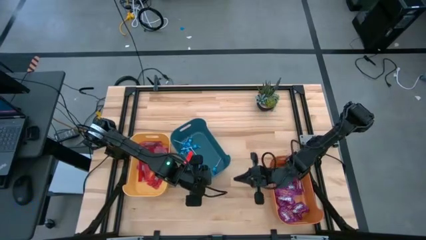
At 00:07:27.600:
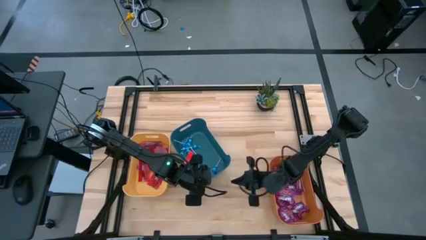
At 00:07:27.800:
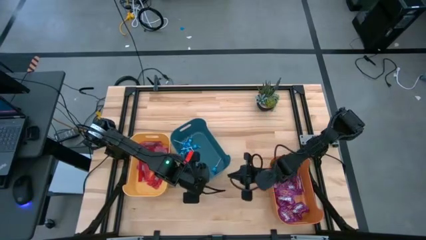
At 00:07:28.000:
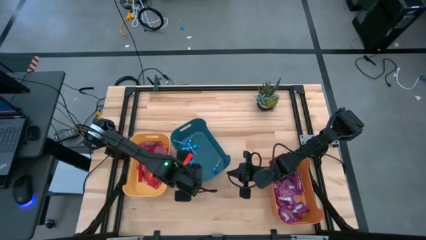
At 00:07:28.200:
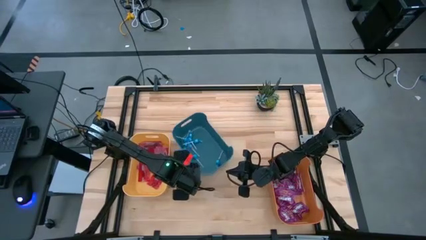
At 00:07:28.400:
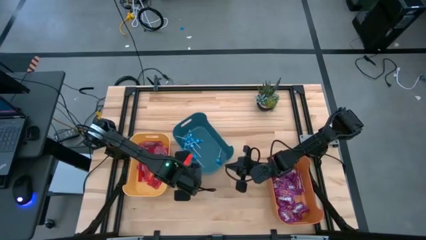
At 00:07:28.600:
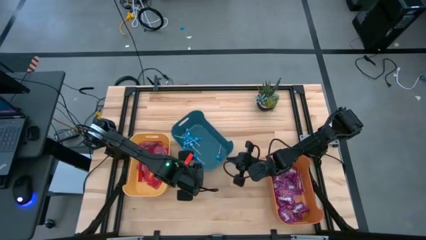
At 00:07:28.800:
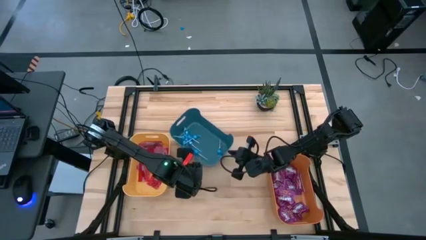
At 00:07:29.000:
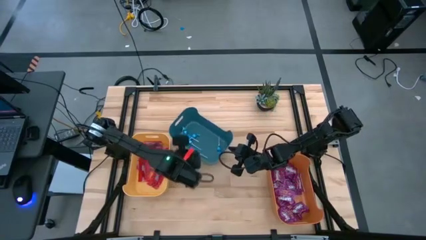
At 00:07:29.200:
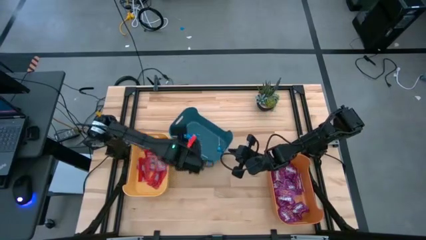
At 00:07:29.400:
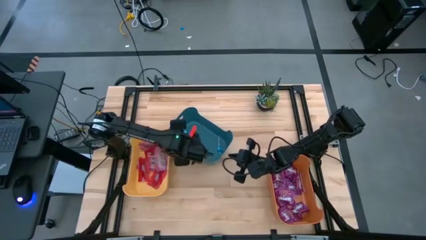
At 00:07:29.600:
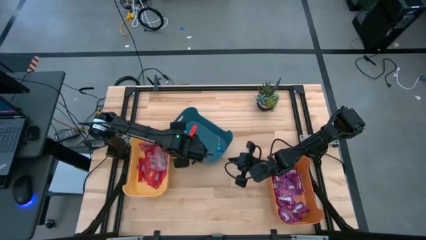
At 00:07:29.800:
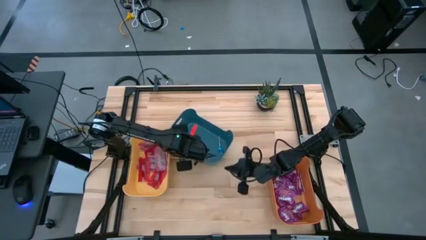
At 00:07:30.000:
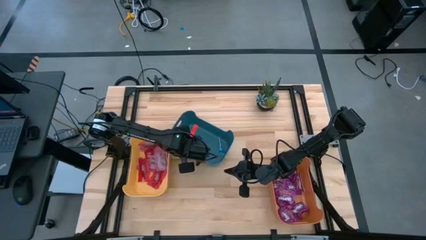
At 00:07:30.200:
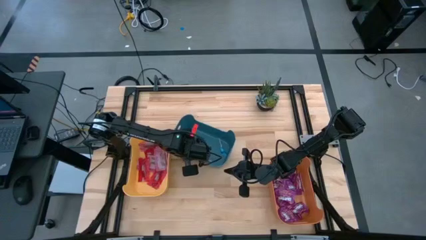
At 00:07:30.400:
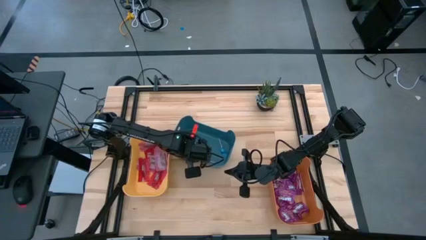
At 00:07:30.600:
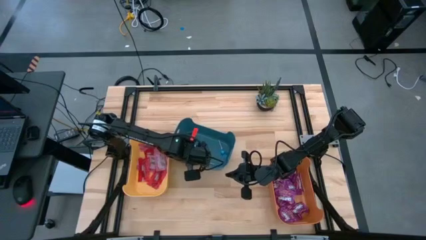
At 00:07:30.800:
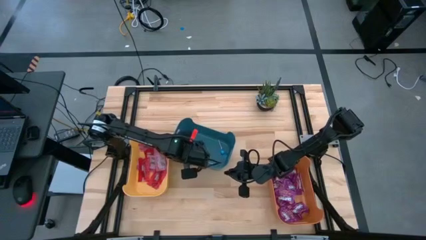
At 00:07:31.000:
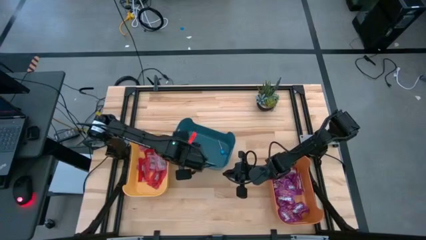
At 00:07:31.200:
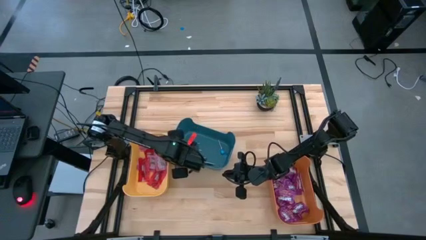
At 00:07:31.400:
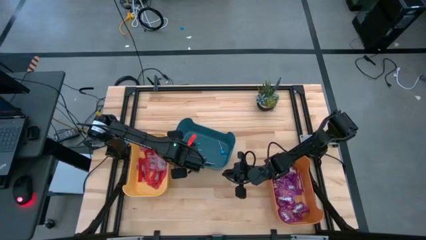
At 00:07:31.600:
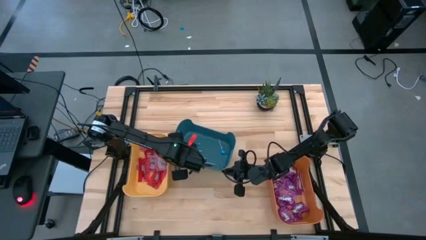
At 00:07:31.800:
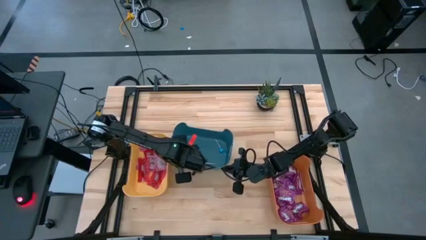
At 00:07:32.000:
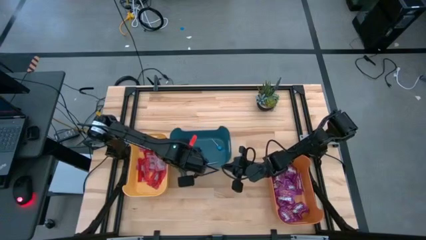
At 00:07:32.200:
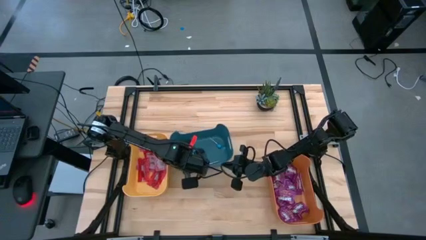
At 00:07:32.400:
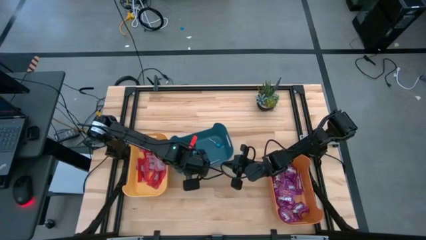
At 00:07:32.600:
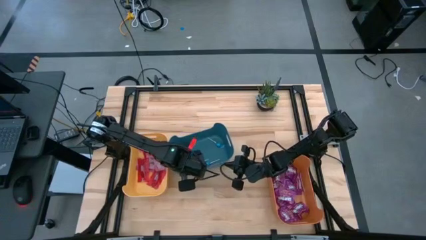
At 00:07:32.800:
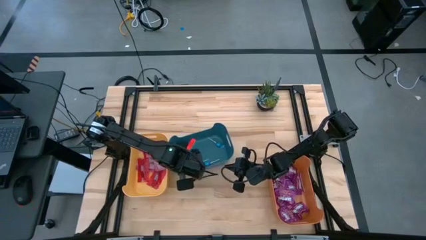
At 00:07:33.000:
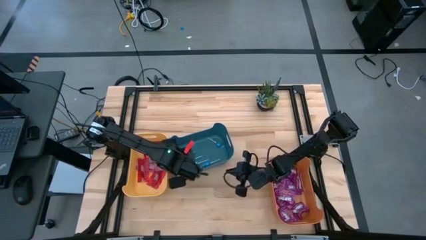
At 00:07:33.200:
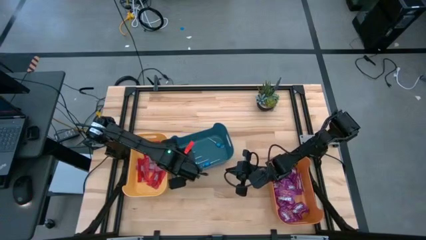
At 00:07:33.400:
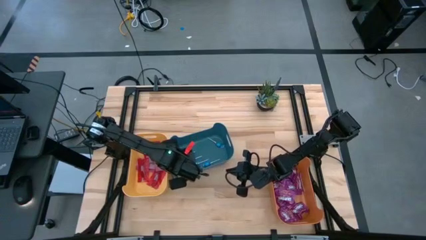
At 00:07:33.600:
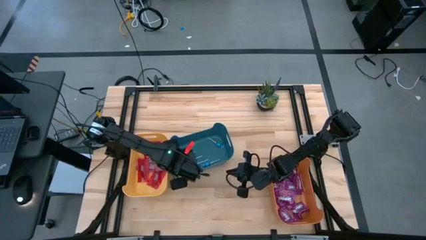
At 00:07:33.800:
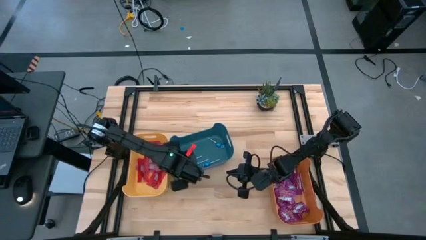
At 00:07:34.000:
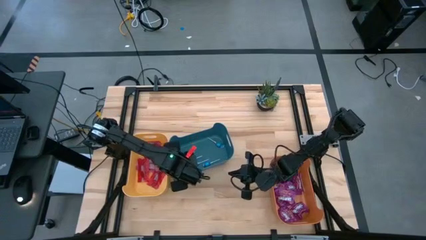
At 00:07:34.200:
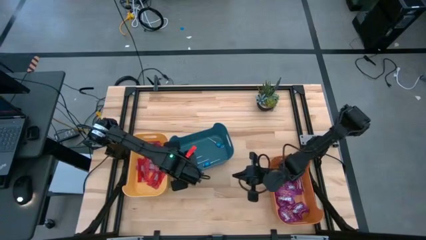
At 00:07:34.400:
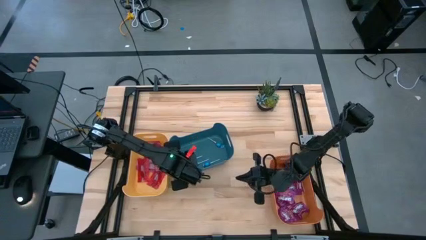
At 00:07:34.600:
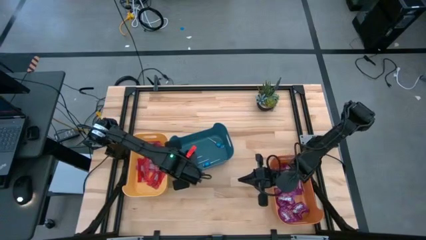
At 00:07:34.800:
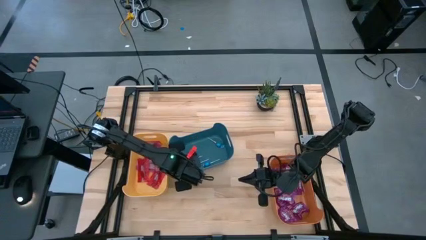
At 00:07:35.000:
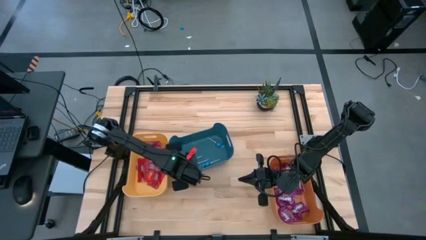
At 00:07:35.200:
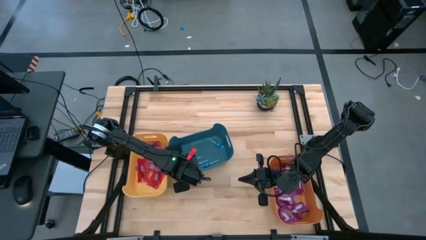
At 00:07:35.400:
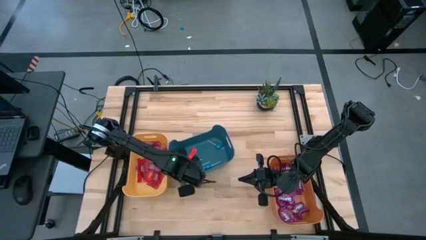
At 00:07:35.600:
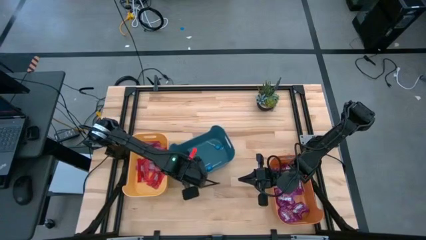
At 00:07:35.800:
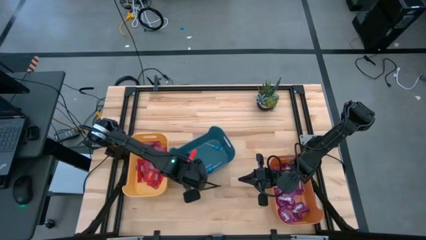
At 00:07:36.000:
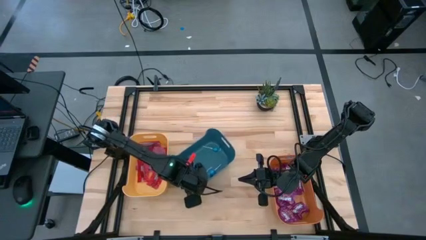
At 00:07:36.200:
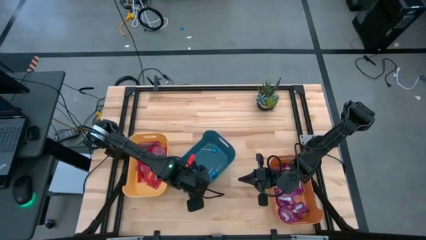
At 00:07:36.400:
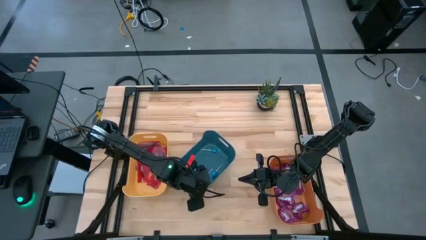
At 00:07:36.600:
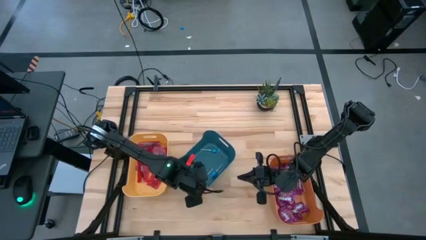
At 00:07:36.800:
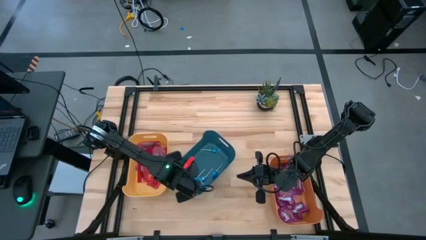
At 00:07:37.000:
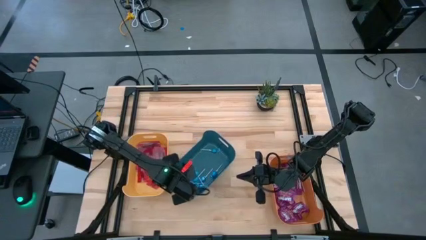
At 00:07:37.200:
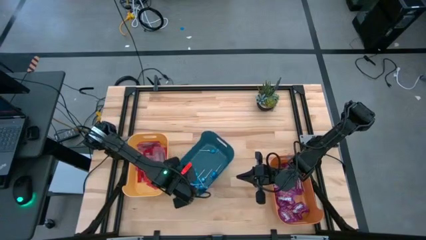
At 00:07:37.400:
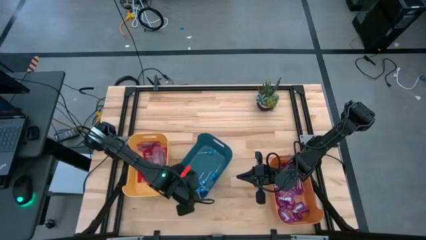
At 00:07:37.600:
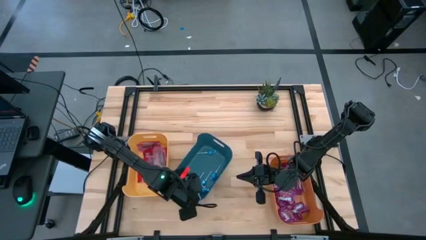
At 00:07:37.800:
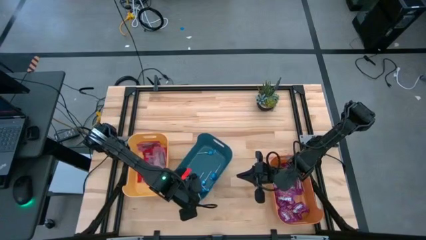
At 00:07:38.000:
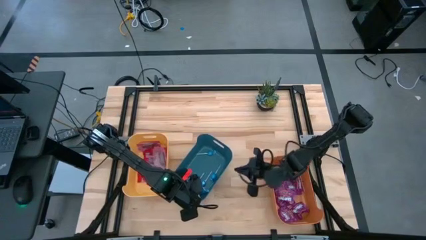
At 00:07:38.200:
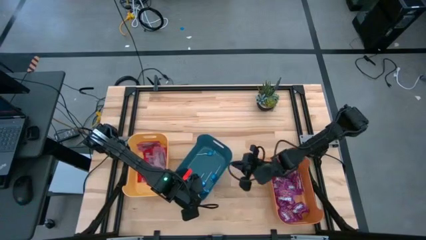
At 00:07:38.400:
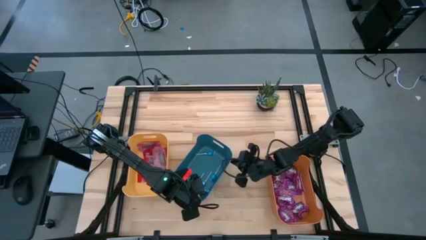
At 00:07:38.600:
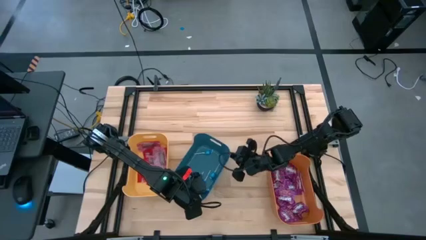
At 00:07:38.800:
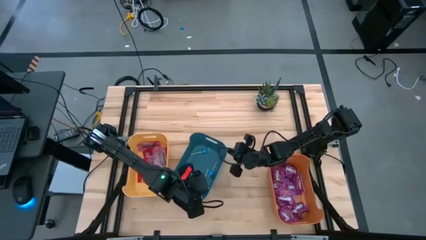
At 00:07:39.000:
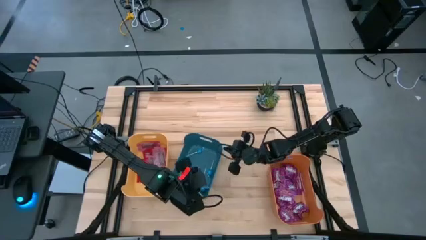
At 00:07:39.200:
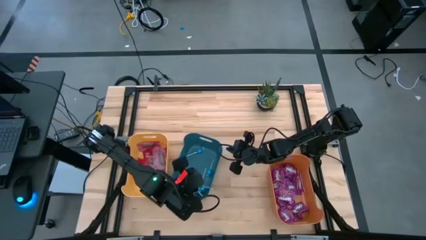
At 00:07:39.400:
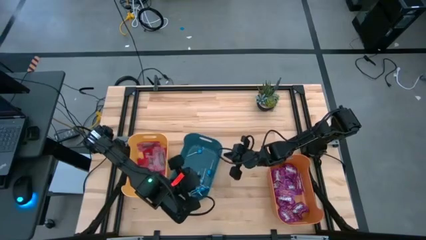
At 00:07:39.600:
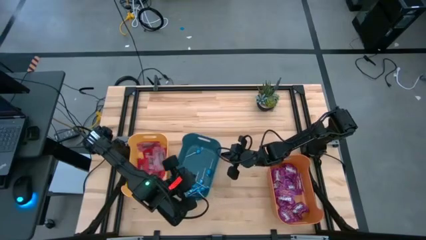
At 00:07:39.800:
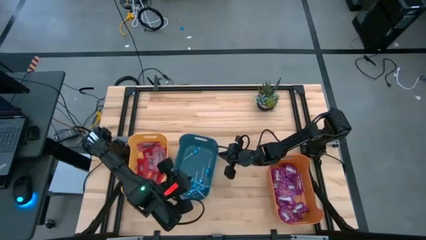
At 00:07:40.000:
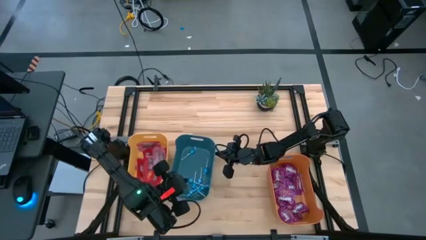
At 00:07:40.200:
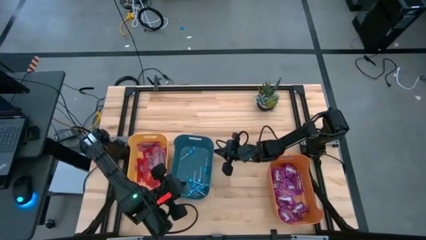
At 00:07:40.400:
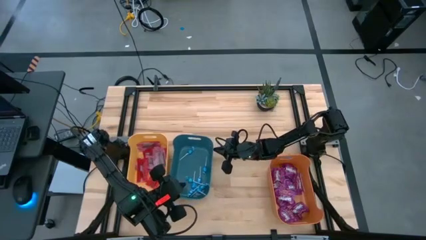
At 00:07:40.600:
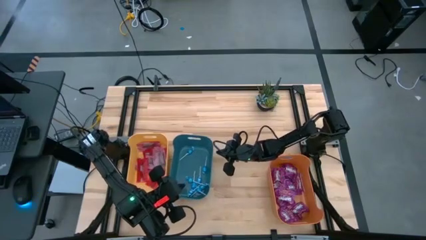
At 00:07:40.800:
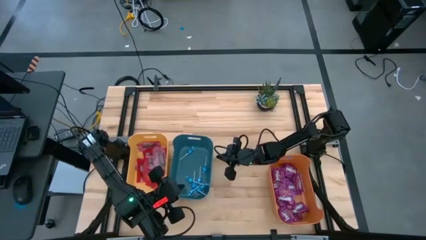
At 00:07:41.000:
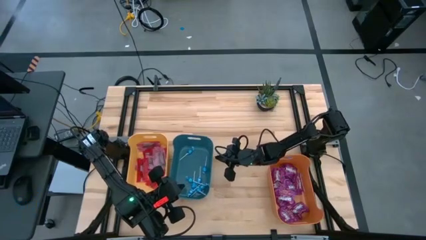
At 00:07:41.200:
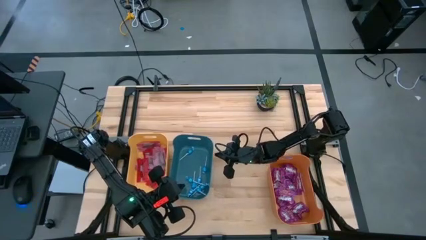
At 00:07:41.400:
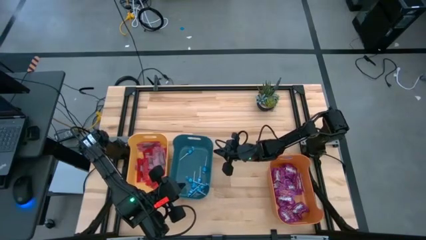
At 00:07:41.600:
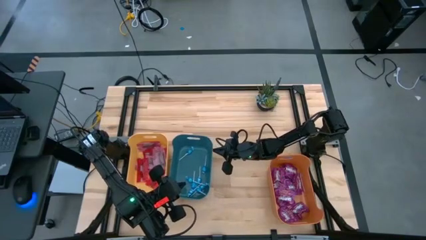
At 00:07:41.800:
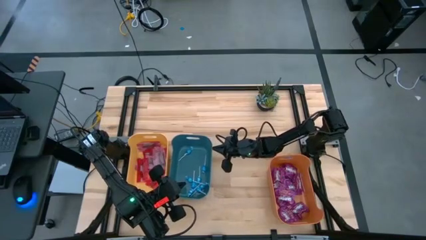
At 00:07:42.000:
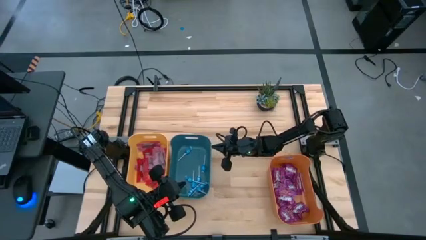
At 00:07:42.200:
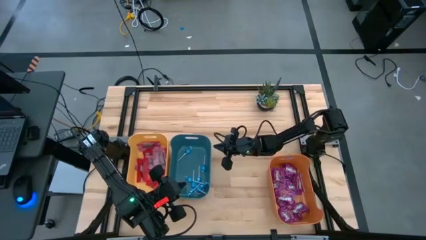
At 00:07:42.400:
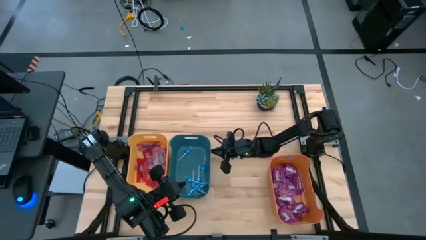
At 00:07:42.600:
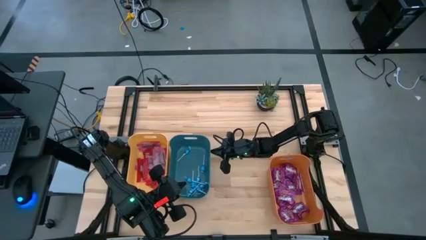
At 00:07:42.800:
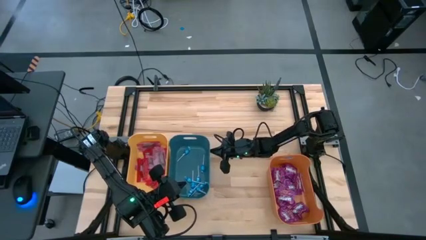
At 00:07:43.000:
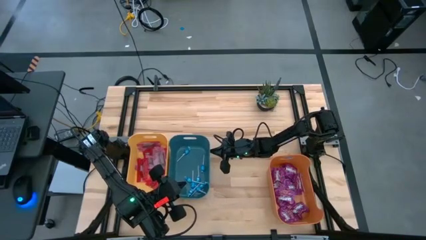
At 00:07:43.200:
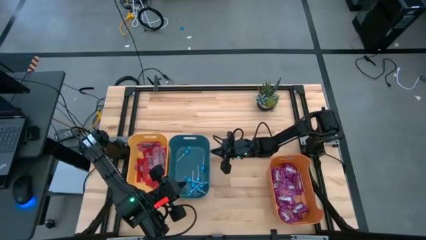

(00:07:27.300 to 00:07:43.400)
Task: Sort candy
Move the blue bin to the center of the table
